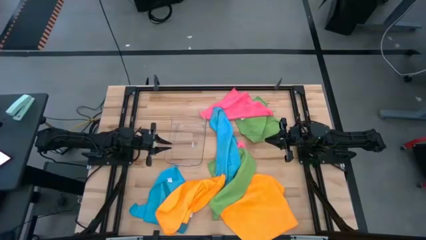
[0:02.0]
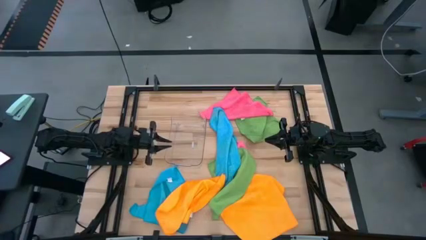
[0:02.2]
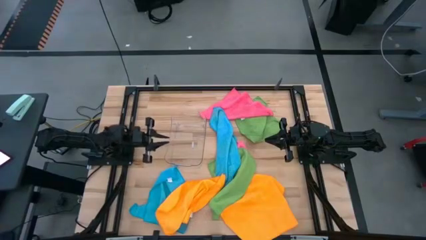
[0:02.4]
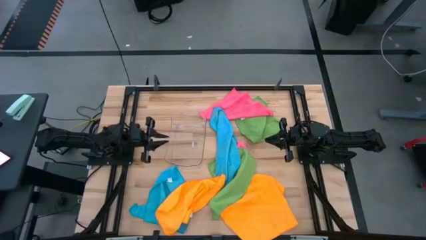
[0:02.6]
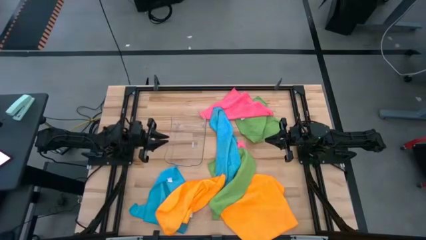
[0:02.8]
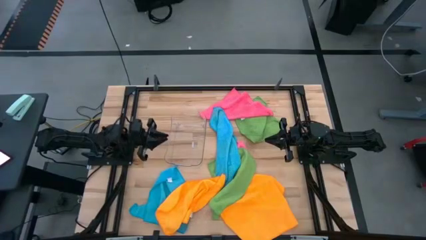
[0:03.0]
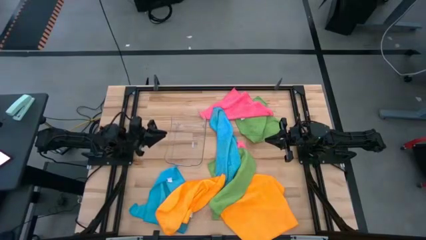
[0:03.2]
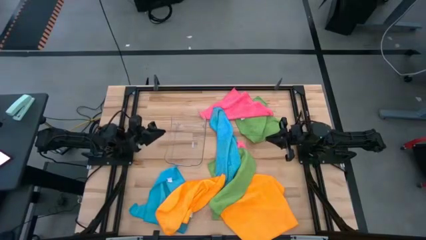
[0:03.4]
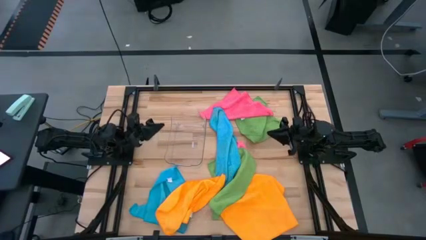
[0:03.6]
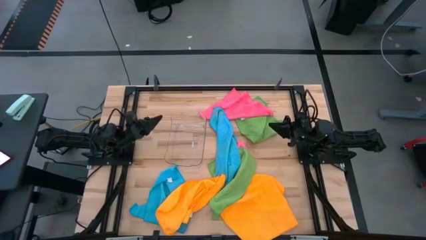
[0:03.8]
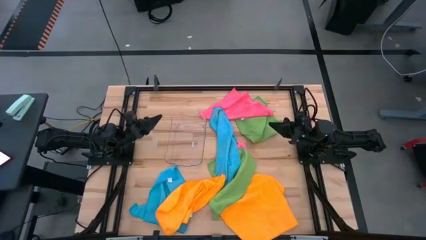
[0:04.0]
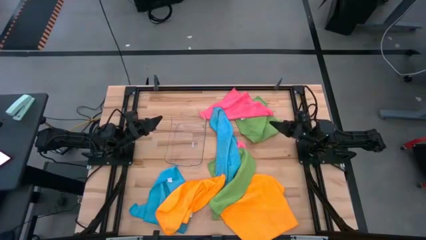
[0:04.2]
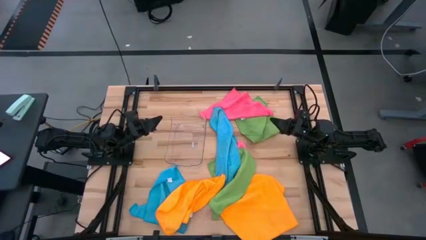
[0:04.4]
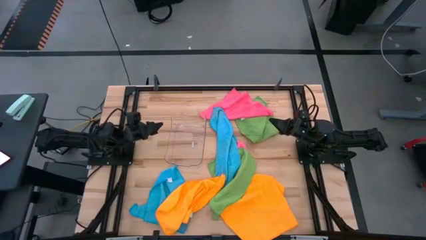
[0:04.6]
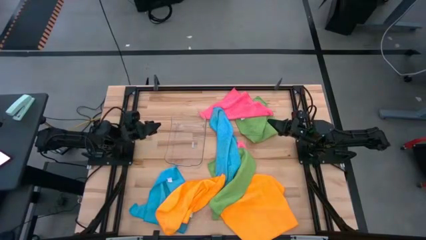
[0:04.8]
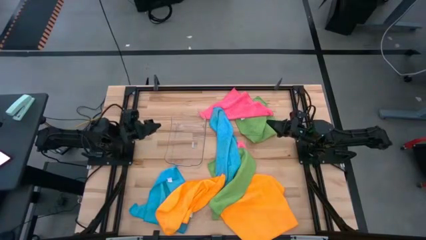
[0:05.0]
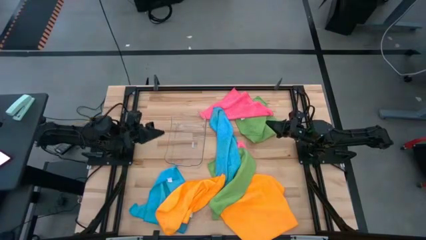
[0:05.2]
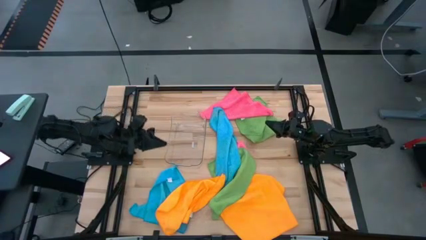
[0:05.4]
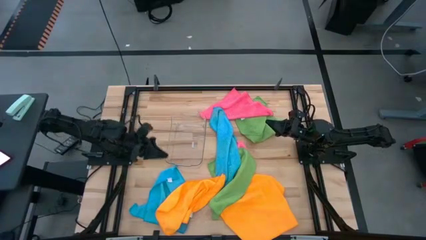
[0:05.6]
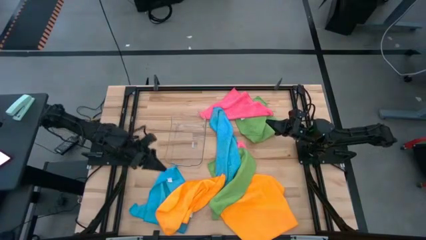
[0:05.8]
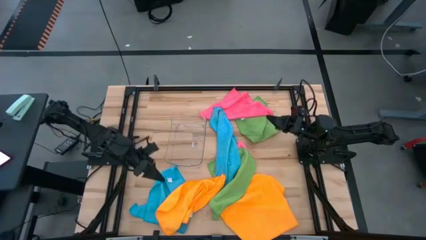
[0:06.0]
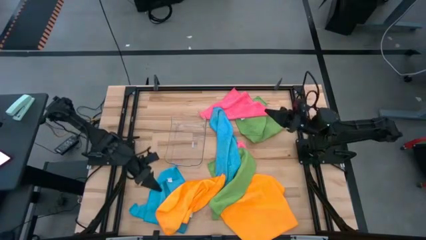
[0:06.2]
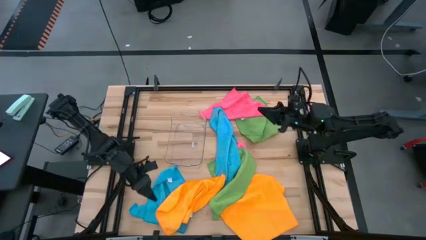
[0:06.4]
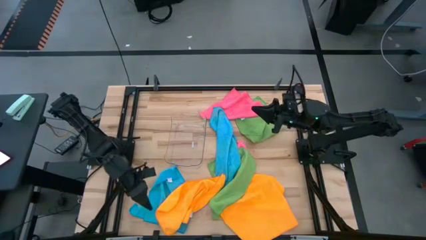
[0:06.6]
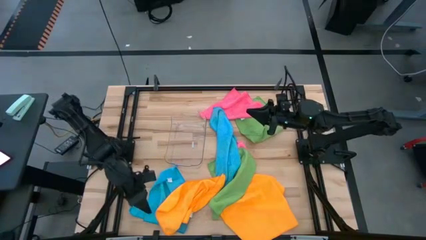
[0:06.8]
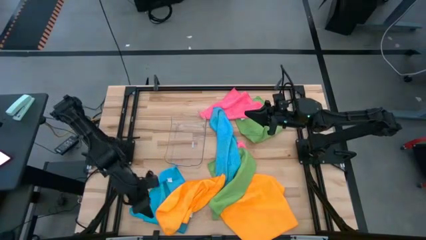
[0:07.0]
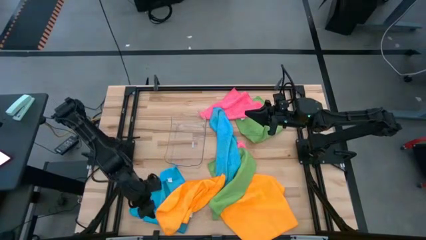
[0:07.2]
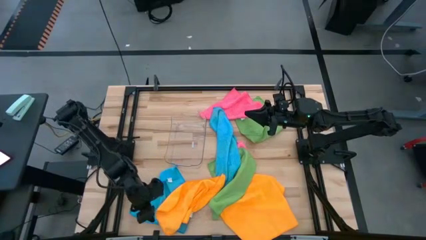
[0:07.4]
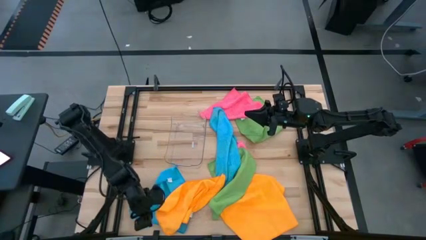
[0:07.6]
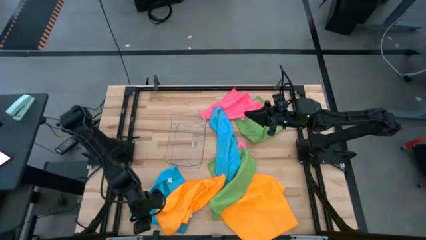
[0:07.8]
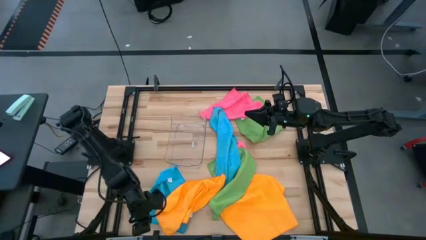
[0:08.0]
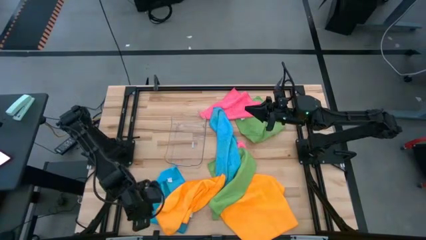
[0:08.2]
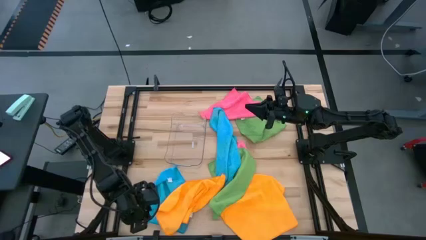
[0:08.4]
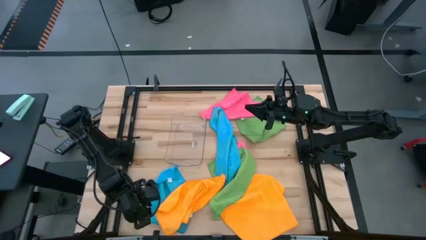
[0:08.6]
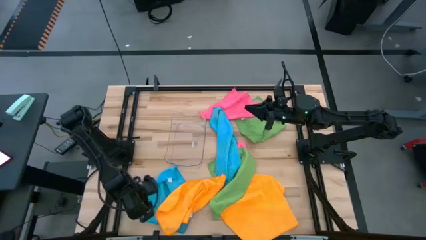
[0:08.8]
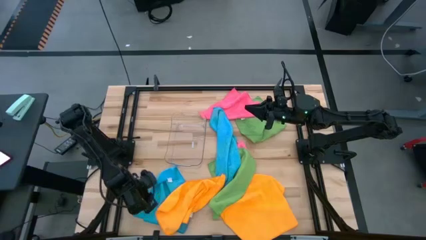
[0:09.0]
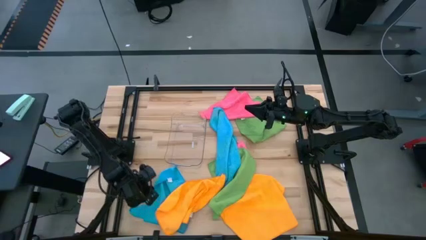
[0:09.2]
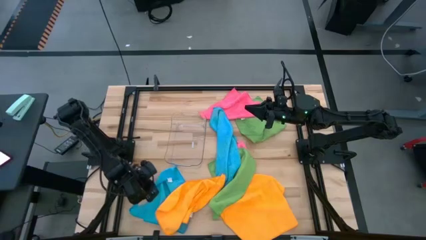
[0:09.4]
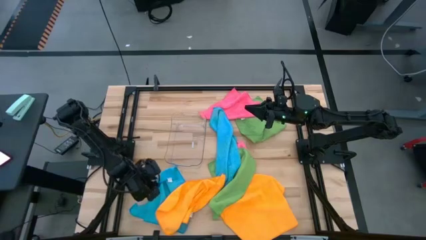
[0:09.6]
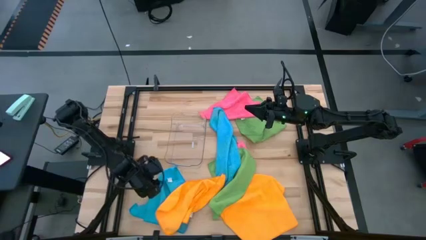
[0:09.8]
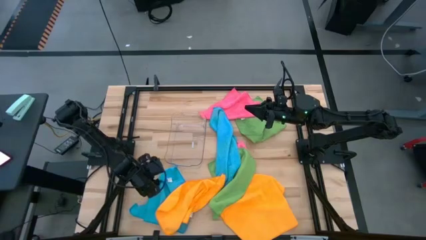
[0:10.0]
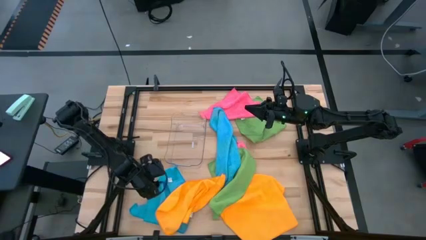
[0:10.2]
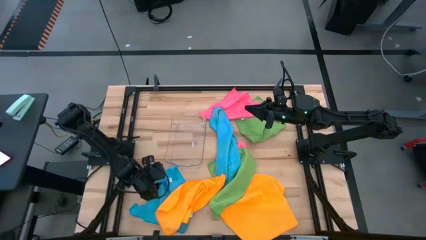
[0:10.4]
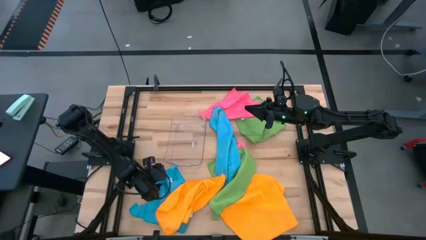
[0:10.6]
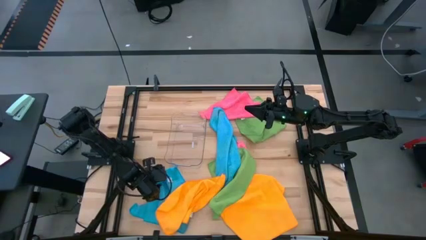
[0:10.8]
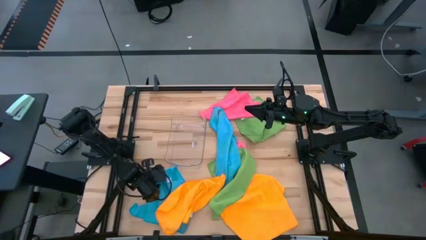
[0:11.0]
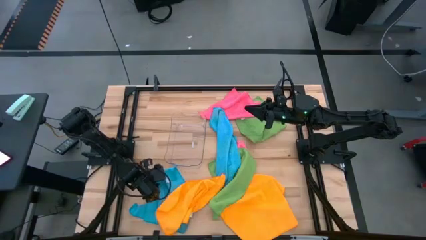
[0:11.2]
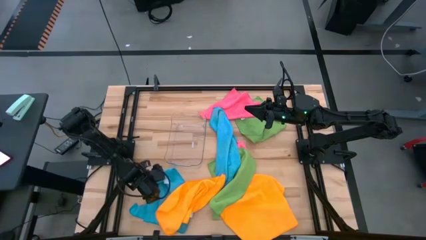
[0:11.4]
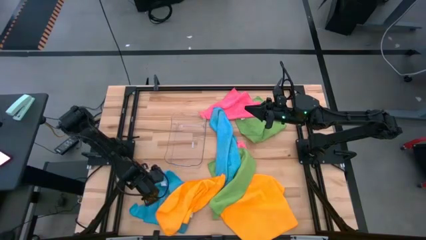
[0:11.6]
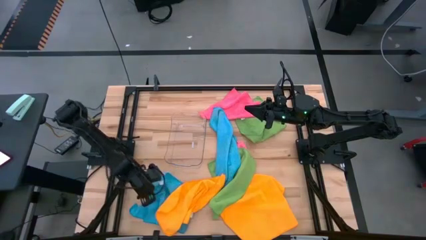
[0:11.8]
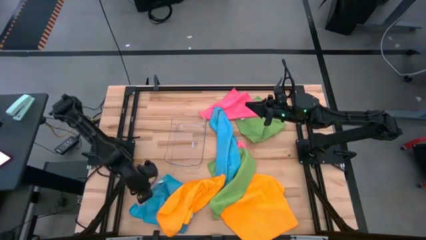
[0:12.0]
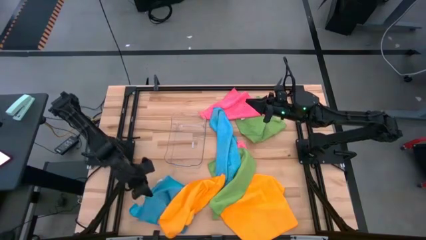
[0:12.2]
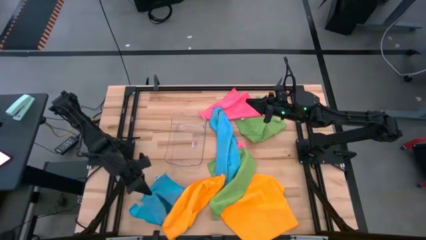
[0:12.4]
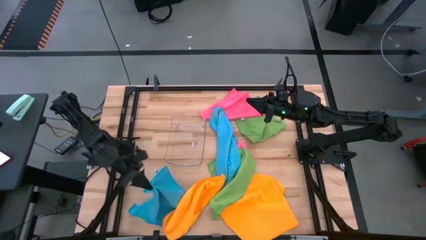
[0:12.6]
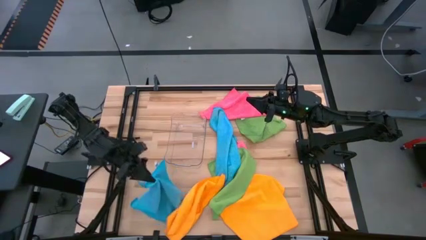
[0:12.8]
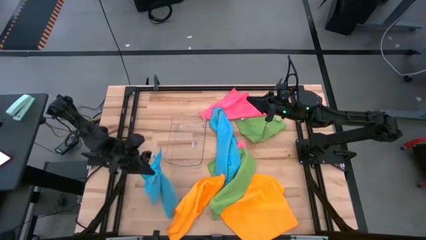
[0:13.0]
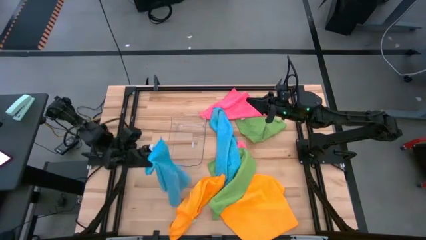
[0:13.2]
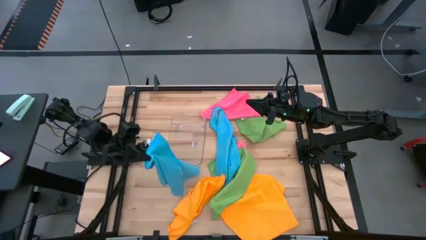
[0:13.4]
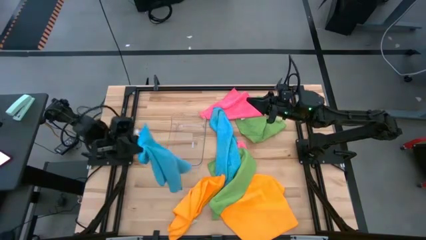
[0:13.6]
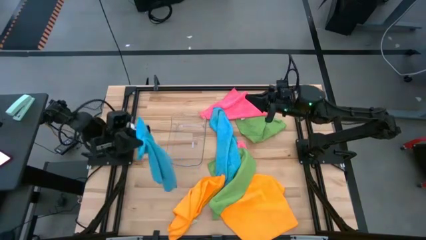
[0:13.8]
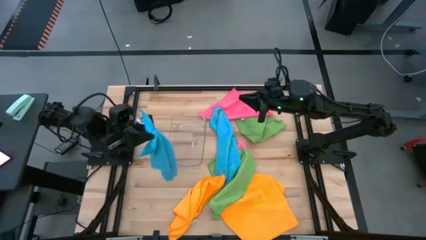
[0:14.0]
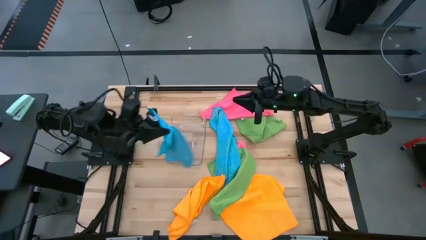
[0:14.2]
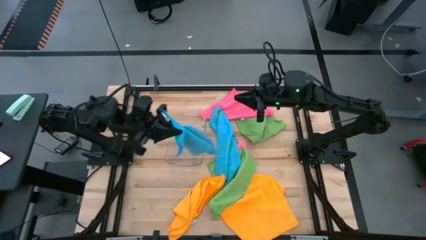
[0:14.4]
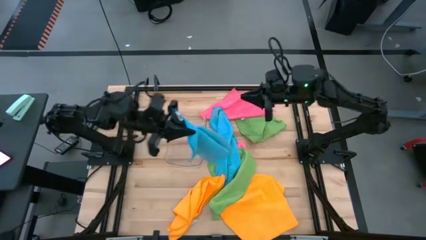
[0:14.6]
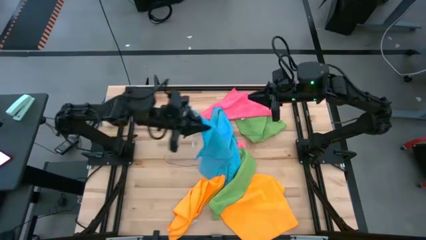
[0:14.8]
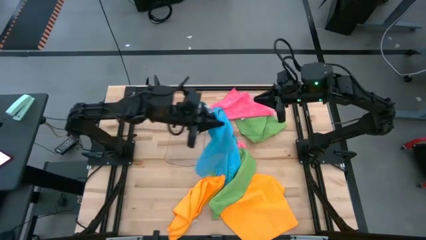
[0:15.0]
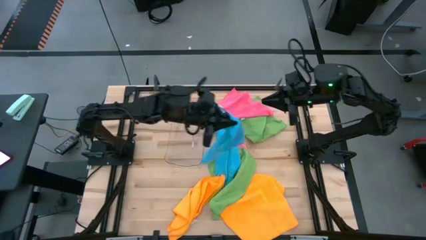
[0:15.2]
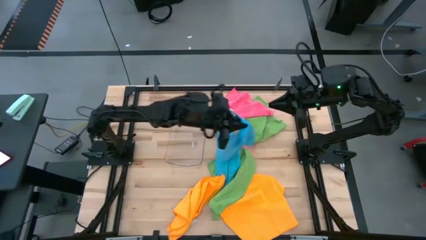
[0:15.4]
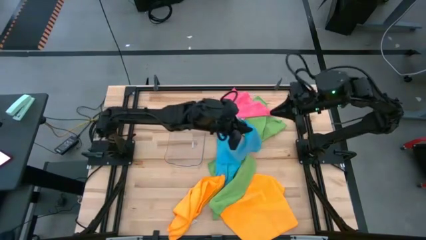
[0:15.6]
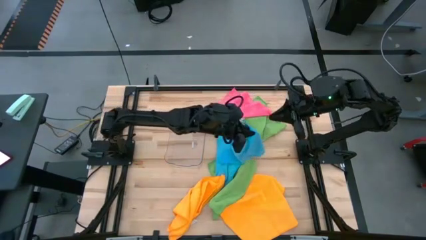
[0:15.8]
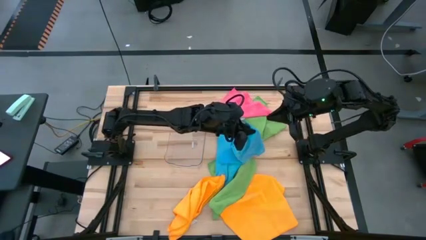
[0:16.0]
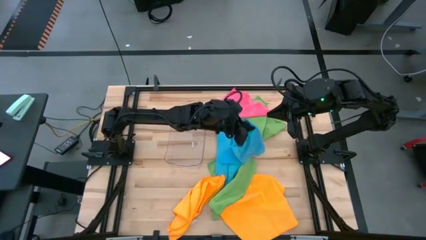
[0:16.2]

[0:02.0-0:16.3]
Task: Fold microfiber towels
Fold the left blue towel
